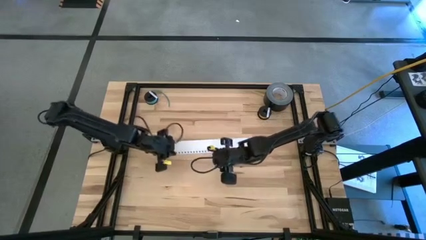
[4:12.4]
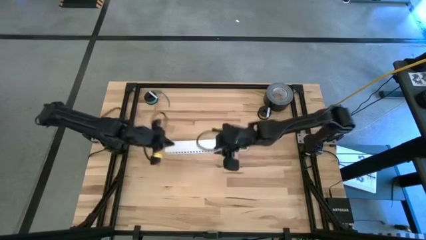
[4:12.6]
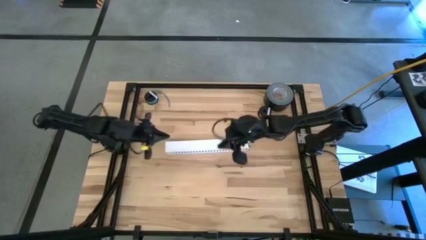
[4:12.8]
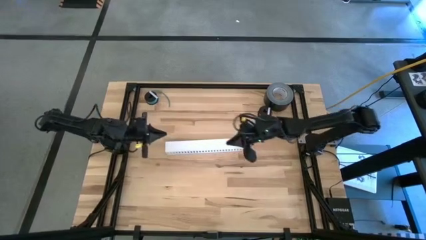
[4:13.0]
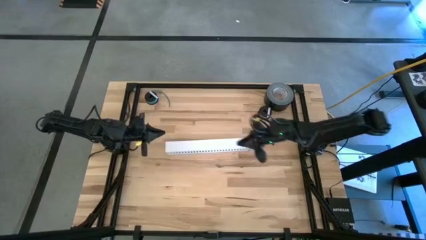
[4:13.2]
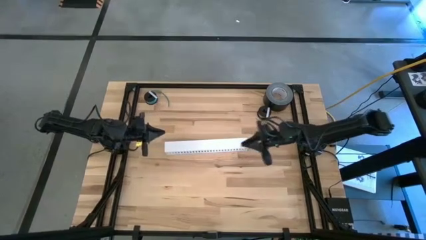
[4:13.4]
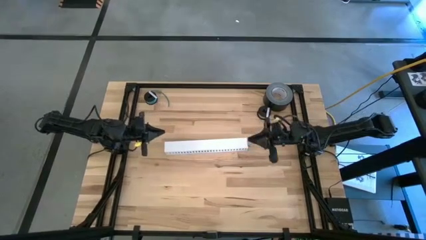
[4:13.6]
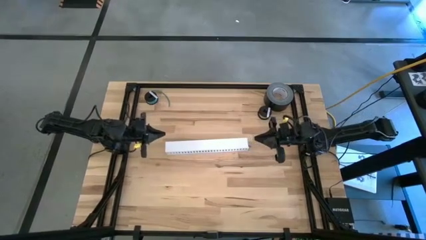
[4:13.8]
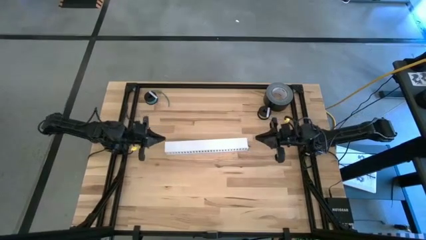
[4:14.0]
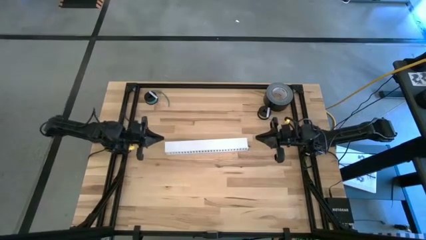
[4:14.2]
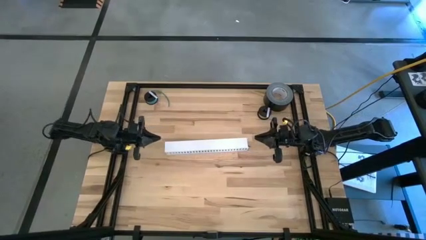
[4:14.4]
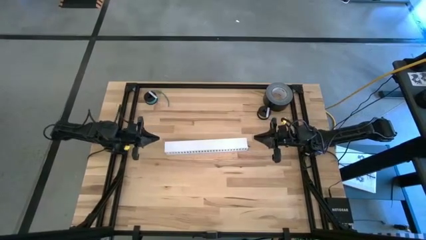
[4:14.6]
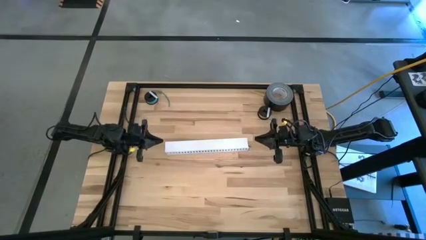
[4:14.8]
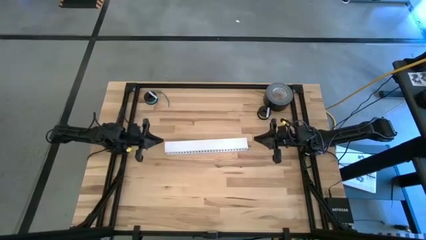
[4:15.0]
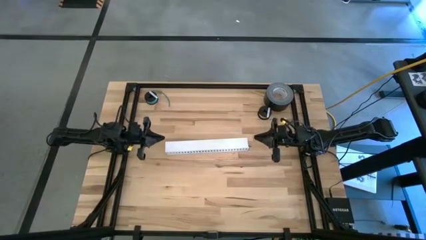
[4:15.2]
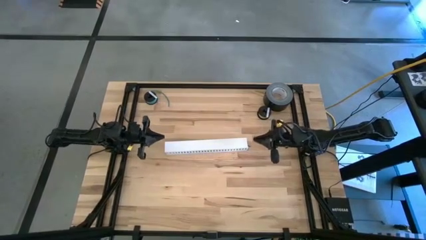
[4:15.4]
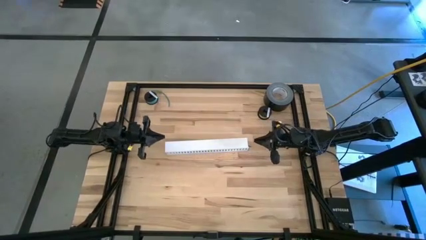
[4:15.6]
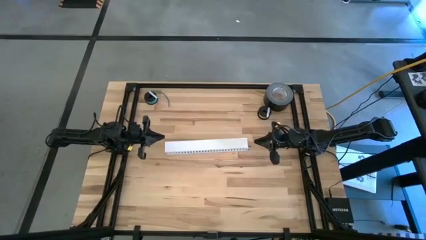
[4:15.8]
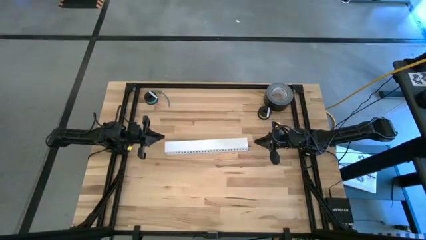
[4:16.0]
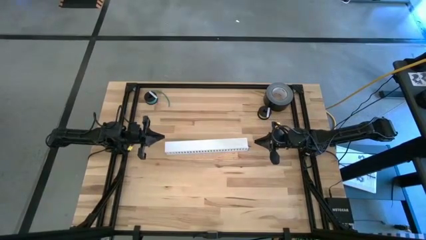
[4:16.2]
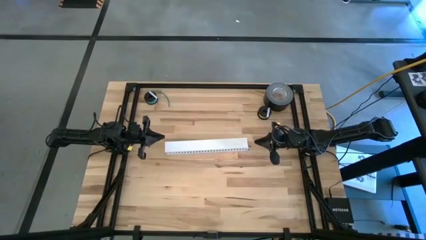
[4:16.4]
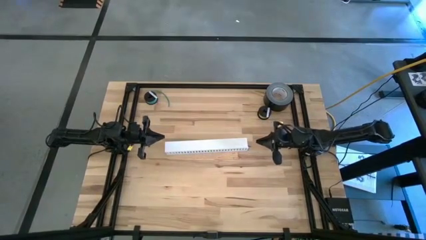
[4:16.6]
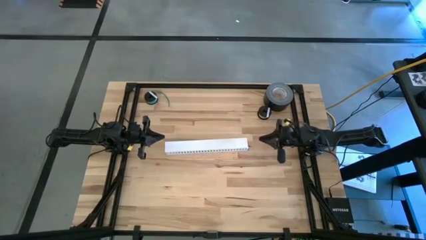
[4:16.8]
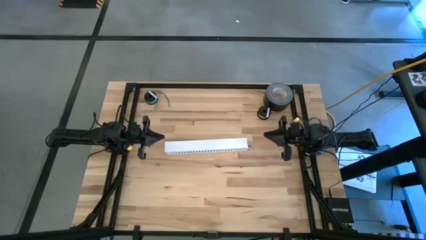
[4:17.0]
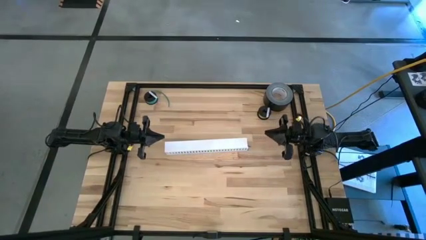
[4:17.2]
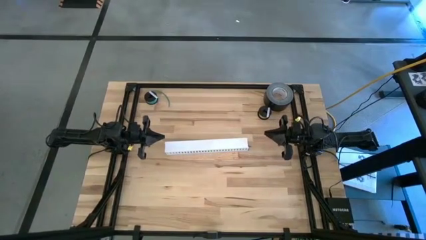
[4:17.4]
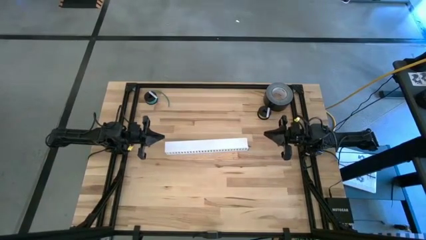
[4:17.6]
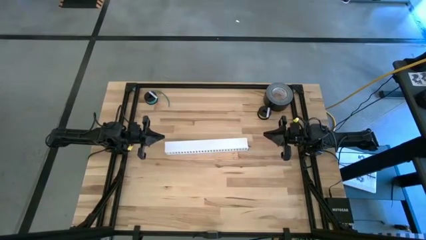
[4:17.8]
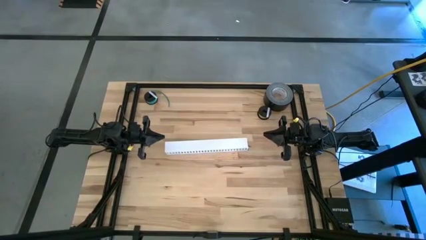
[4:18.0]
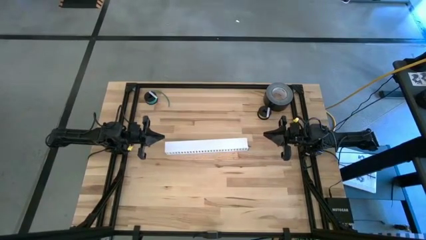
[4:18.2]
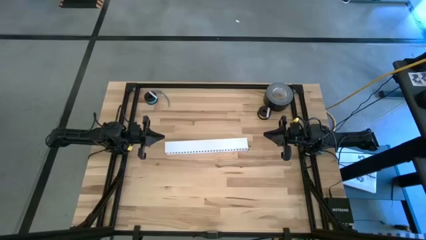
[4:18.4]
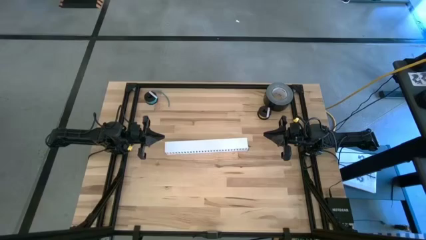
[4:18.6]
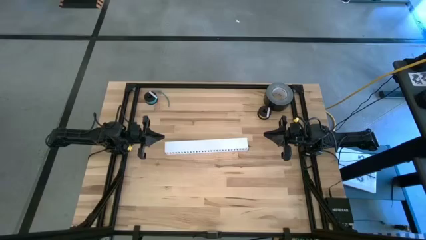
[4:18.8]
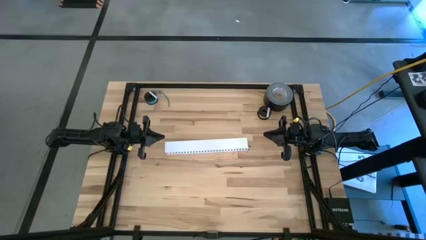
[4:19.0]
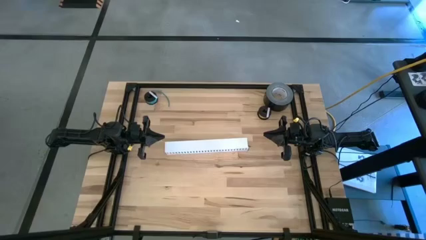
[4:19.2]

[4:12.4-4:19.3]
Task: Ziptie cables
Return to Home Position

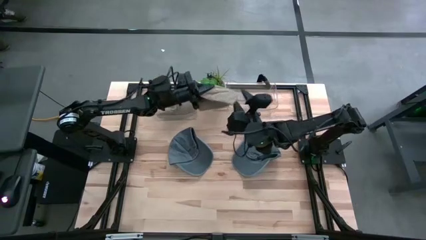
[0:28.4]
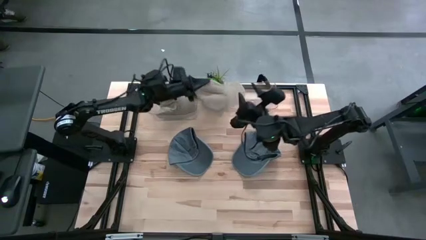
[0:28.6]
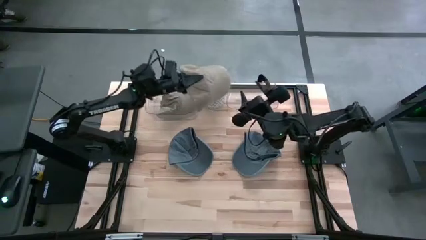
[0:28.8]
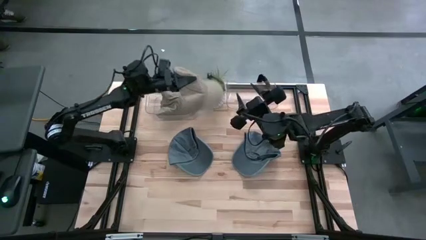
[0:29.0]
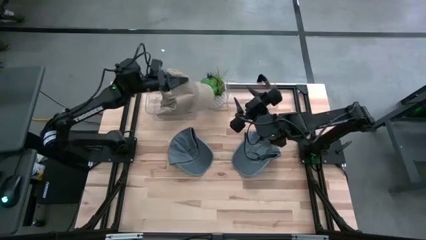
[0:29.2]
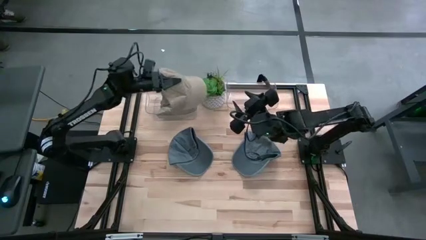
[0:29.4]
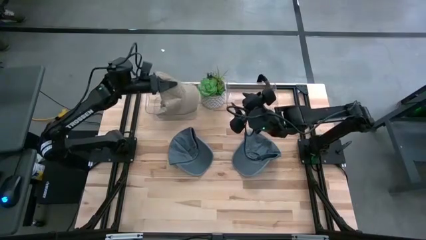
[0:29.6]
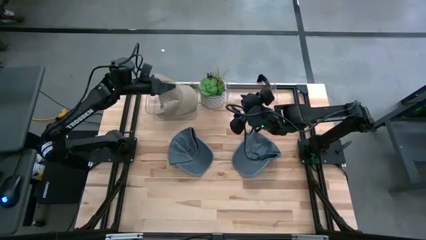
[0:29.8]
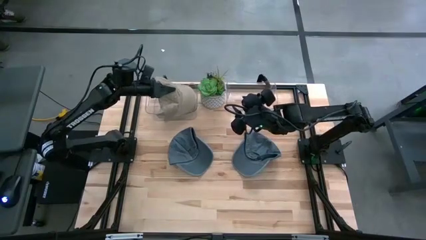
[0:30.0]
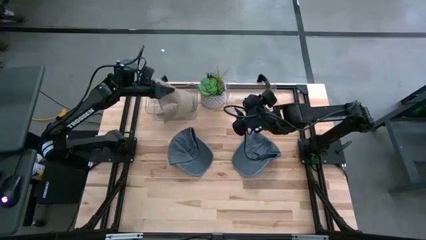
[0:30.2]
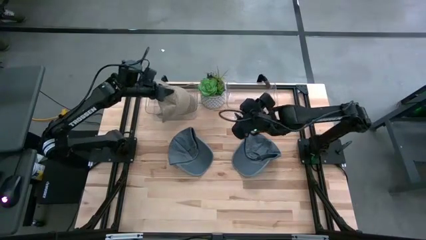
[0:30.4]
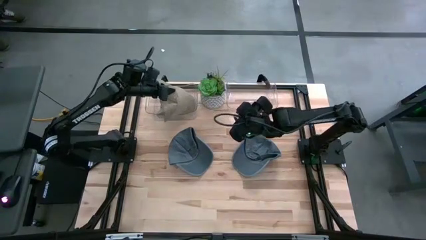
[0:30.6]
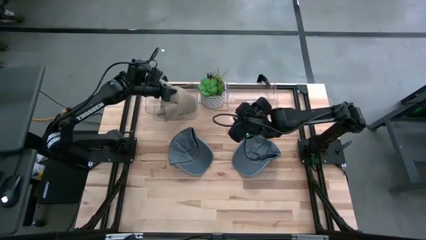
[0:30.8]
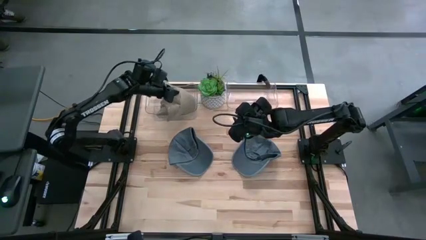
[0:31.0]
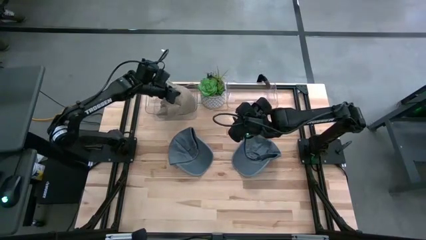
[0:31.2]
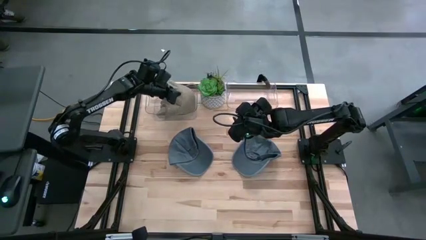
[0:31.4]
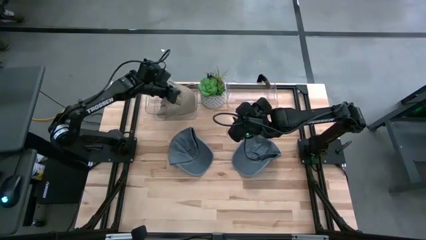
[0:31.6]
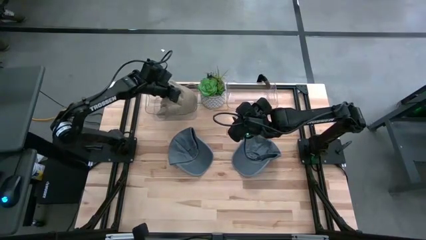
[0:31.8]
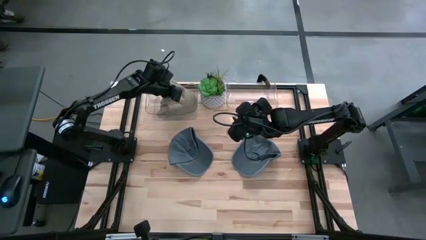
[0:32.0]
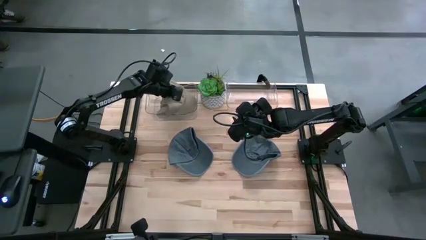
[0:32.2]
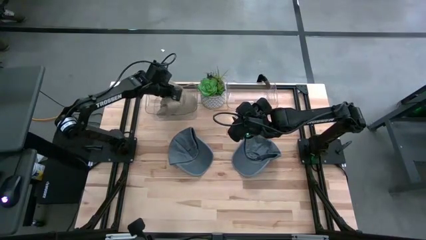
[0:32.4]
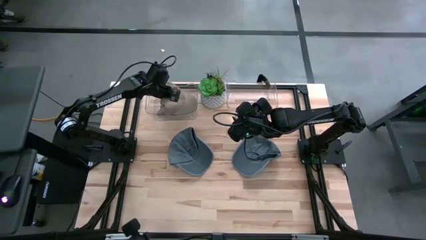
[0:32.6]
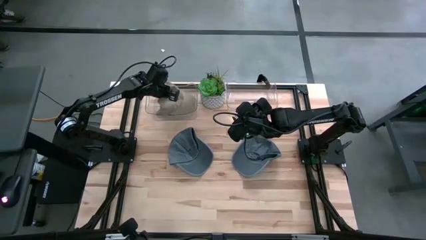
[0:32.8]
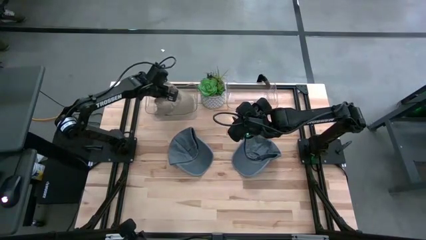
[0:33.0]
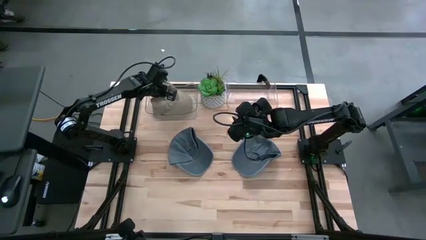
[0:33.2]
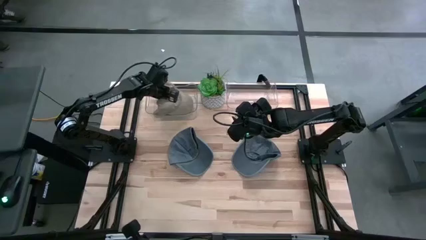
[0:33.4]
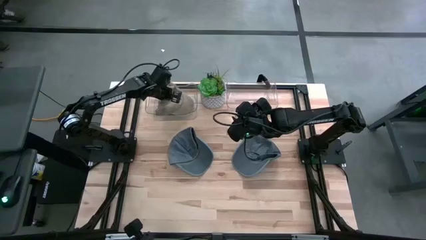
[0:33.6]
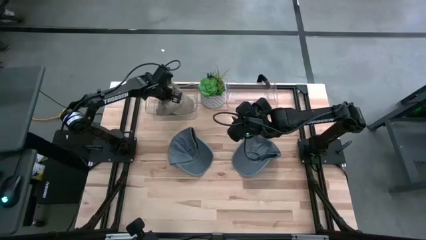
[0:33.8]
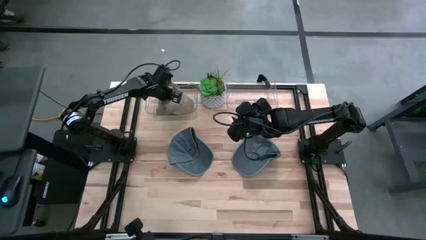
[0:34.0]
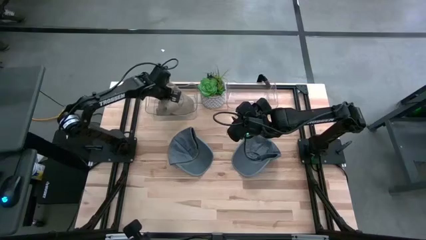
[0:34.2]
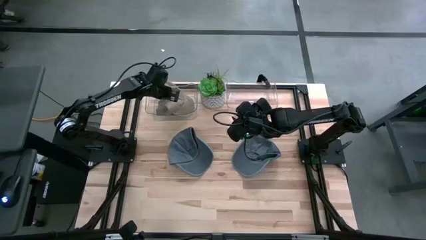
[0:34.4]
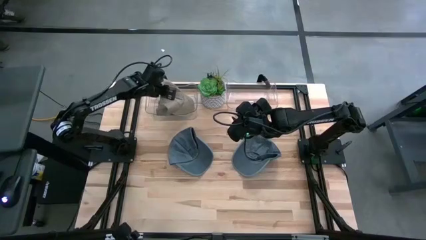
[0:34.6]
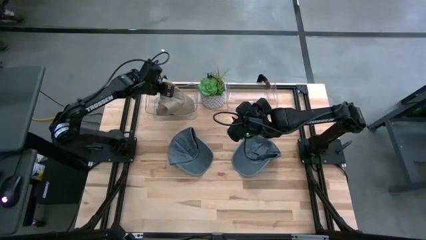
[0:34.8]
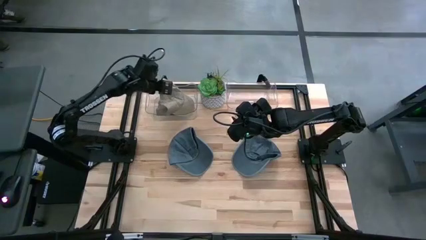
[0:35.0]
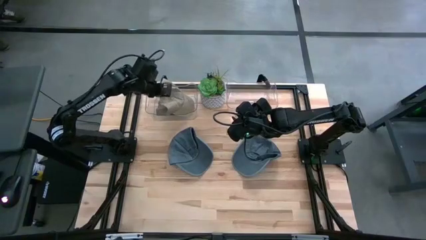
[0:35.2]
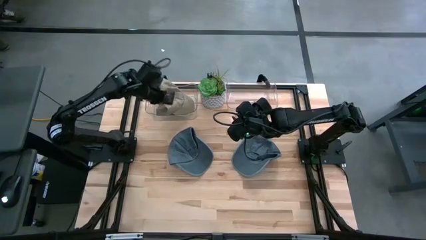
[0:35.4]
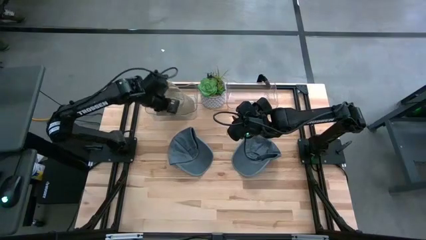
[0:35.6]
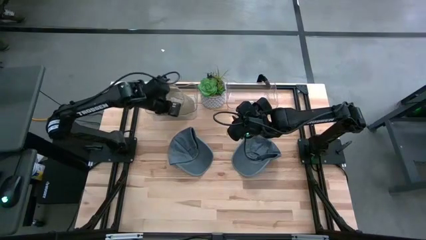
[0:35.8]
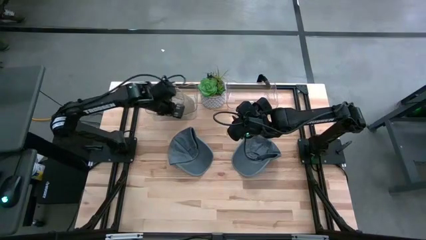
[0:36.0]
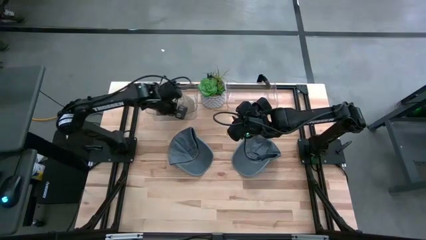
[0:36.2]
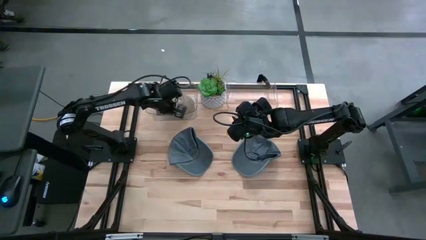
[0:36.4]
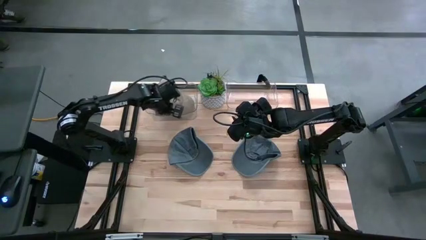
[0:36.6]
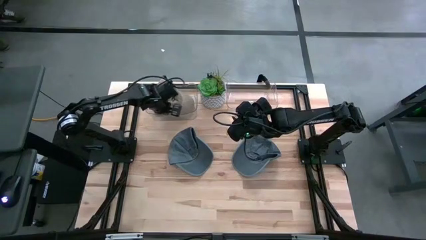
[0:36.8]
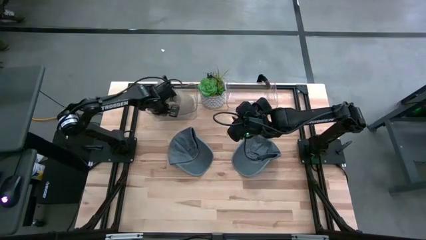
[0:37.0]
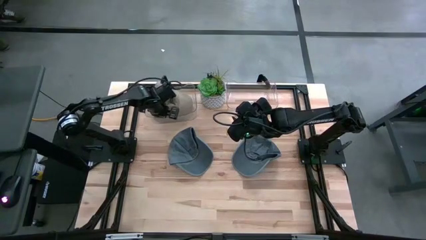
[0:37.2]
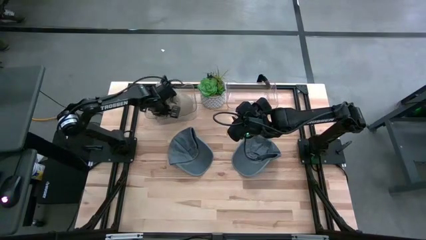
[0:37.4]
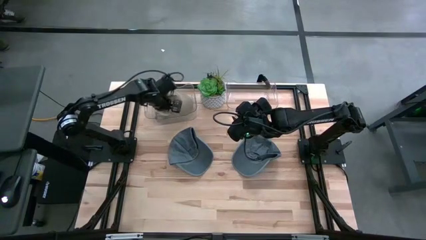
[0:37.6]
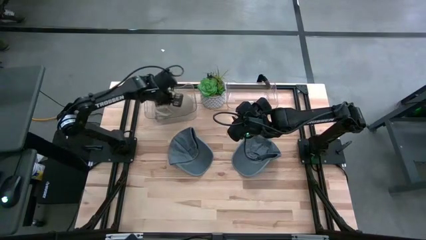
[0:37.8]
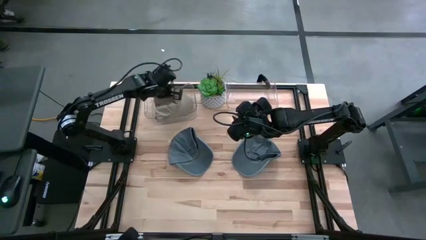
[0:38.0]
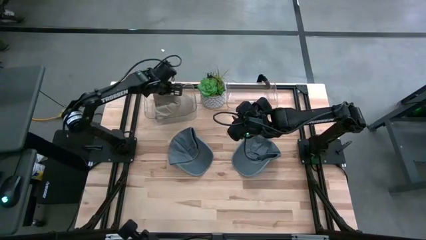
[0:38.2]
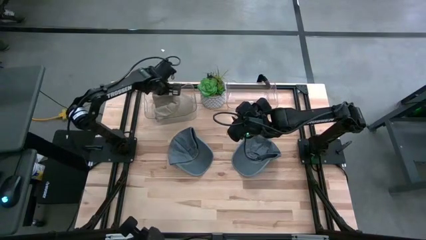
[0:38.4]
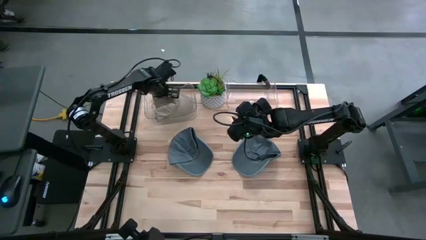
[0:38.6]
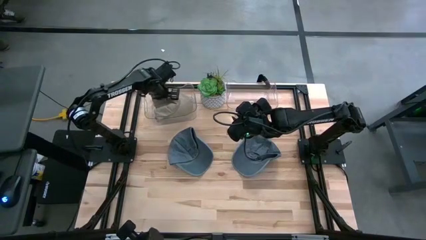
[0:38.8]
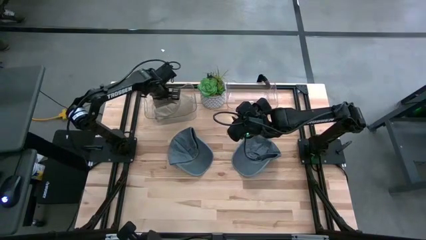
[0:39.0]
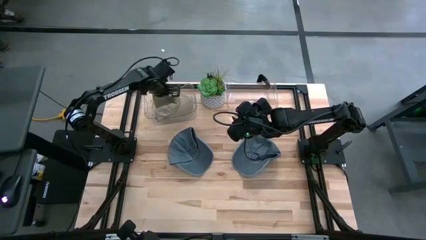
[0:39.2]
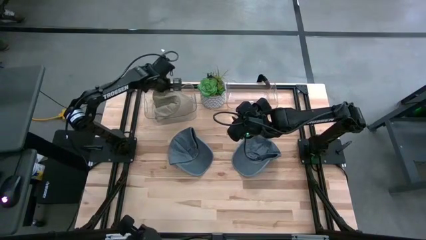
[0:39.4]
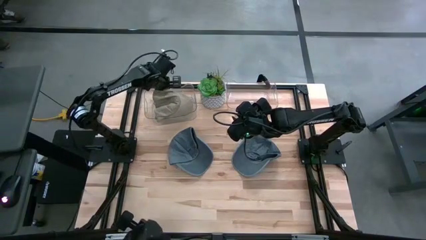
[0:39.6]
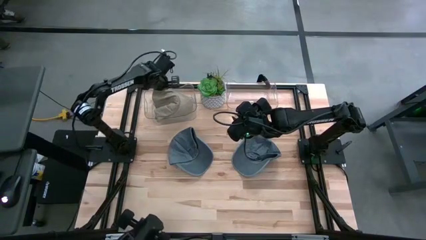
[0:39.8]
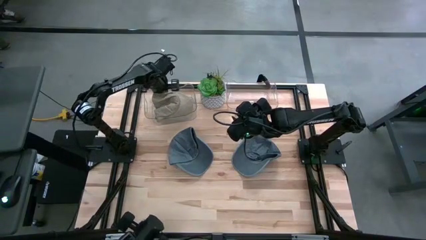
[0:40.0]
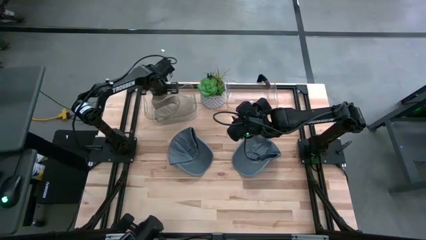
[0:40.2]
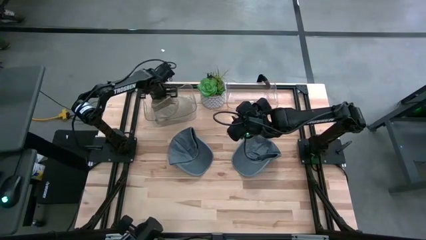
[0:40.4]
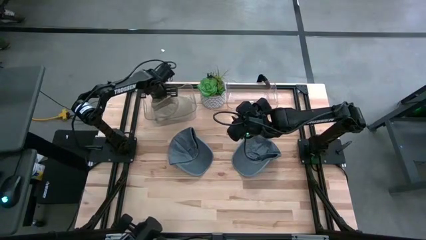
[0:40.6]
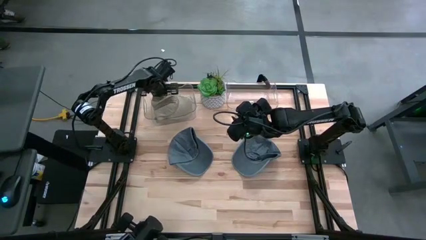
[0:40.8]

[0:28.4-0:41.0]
Task: Pick & Place hat
Put the brown cap into the left transparent bin
